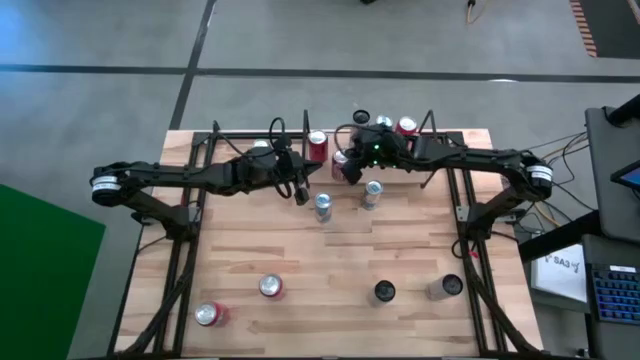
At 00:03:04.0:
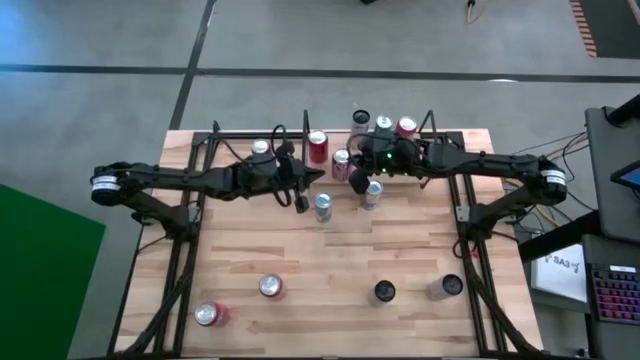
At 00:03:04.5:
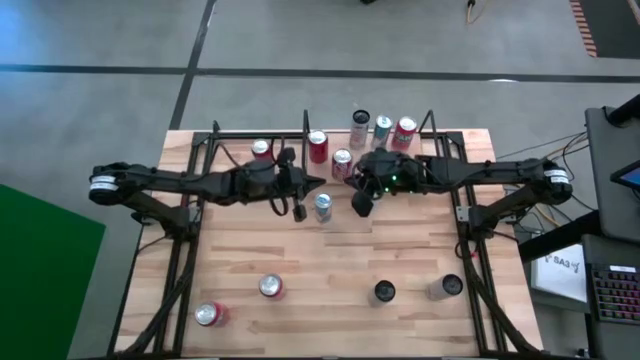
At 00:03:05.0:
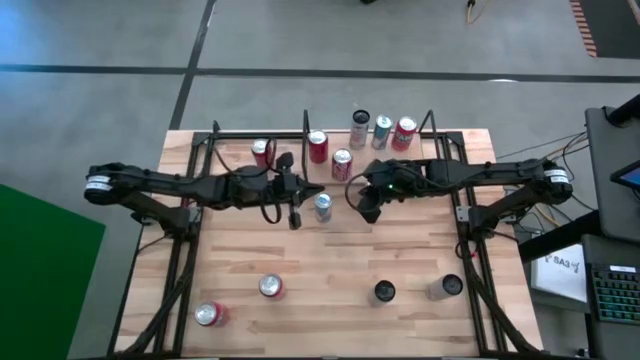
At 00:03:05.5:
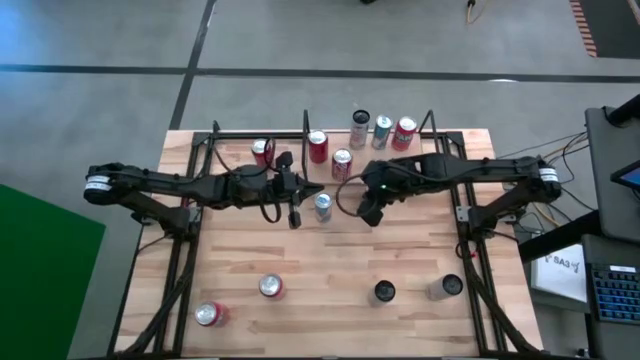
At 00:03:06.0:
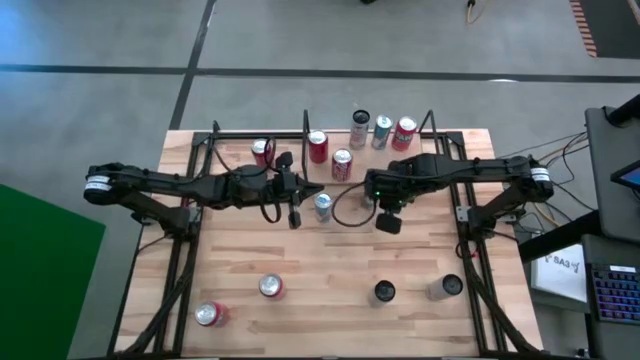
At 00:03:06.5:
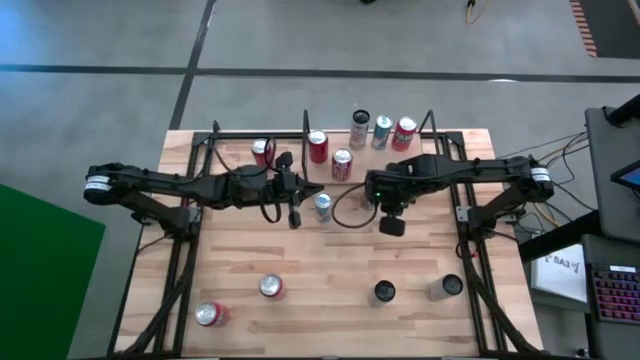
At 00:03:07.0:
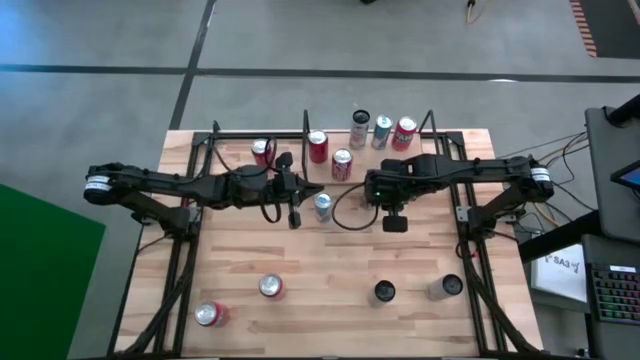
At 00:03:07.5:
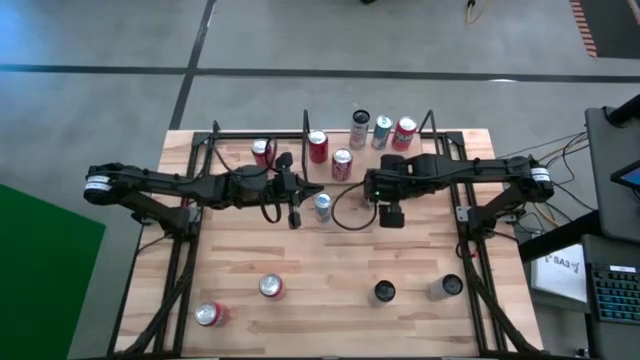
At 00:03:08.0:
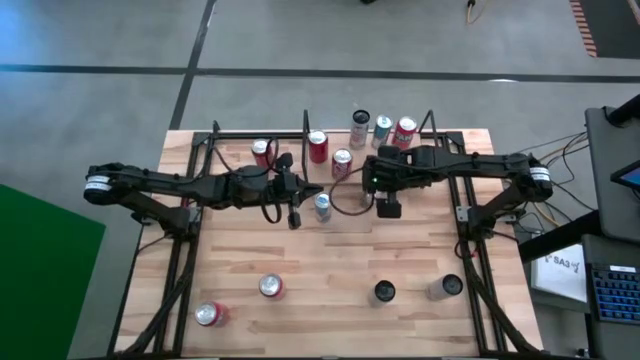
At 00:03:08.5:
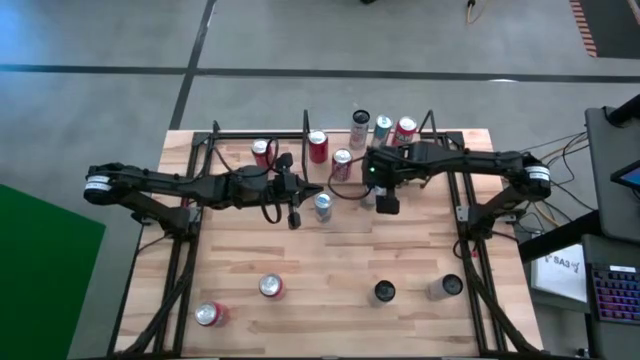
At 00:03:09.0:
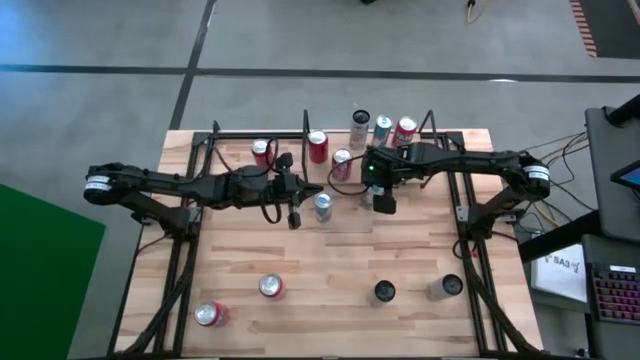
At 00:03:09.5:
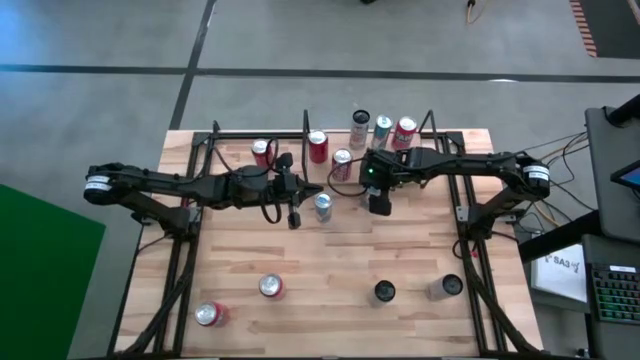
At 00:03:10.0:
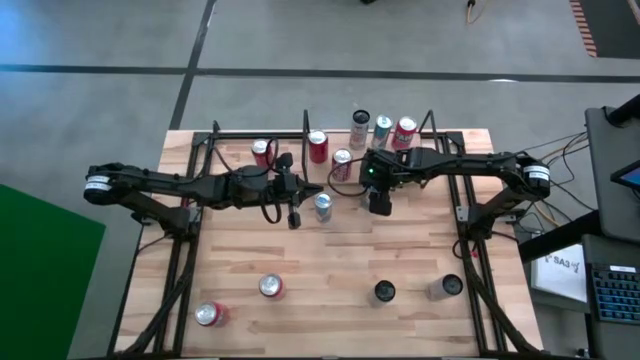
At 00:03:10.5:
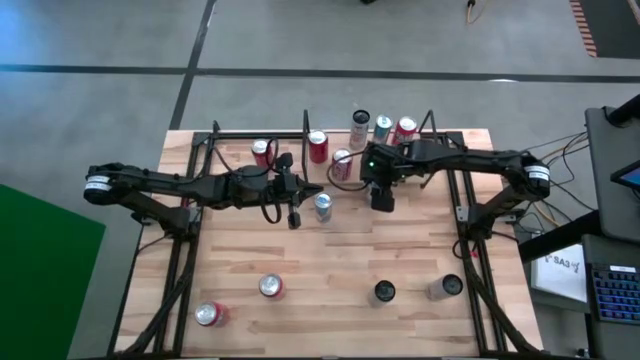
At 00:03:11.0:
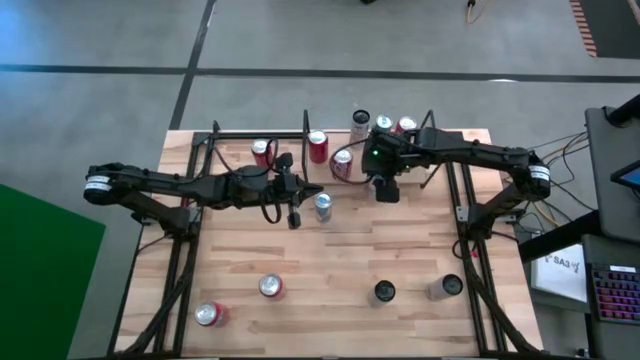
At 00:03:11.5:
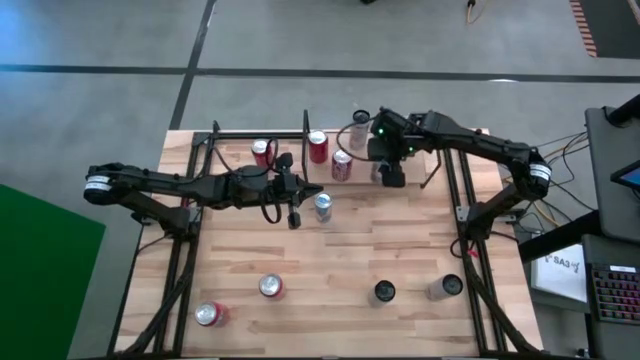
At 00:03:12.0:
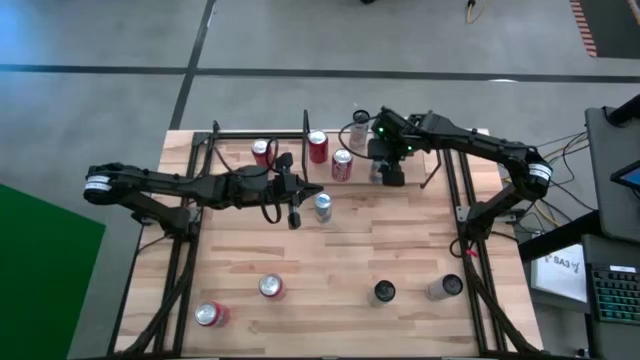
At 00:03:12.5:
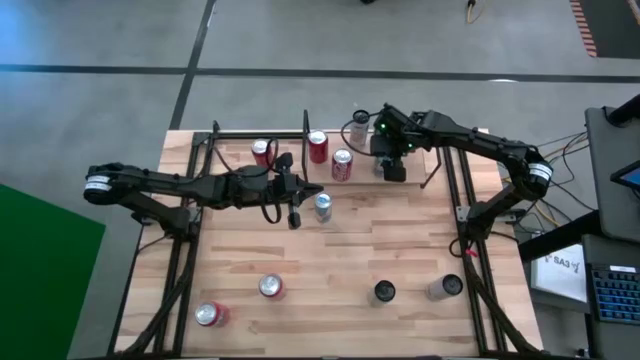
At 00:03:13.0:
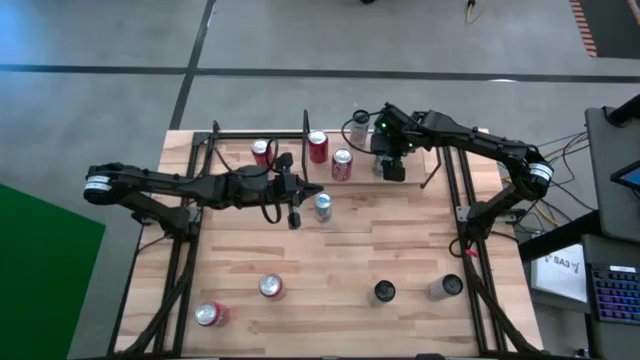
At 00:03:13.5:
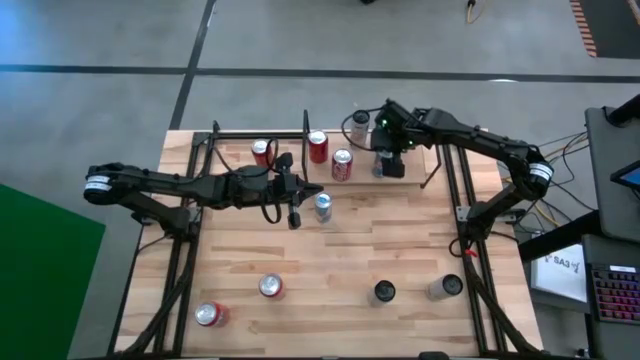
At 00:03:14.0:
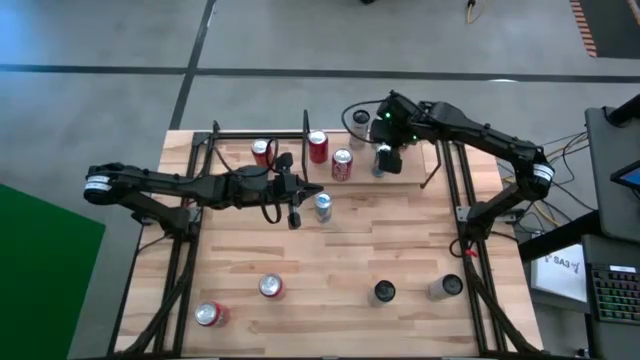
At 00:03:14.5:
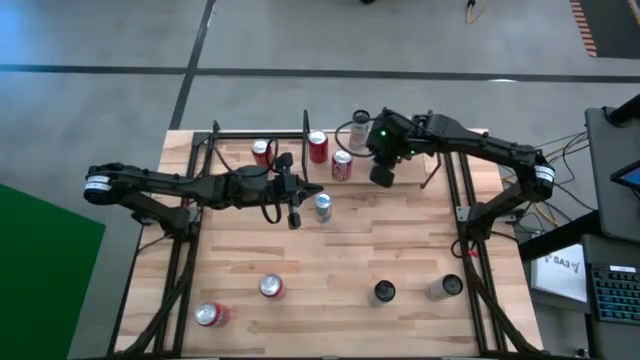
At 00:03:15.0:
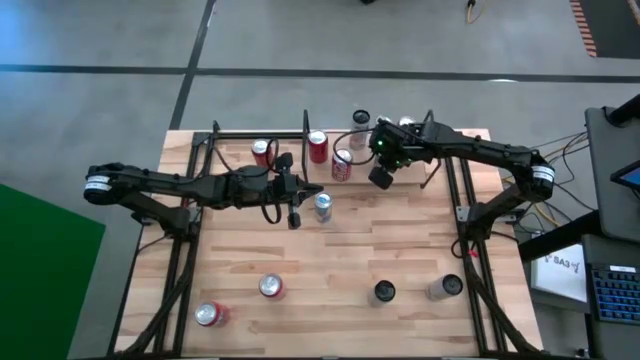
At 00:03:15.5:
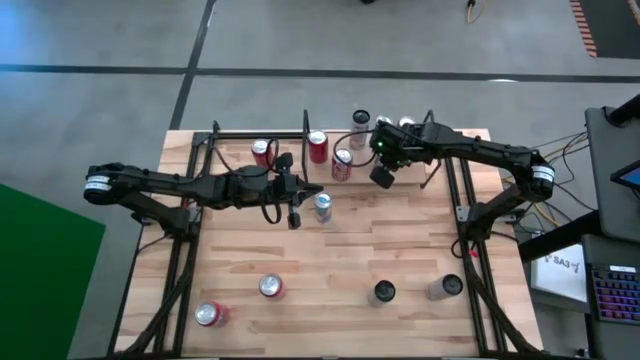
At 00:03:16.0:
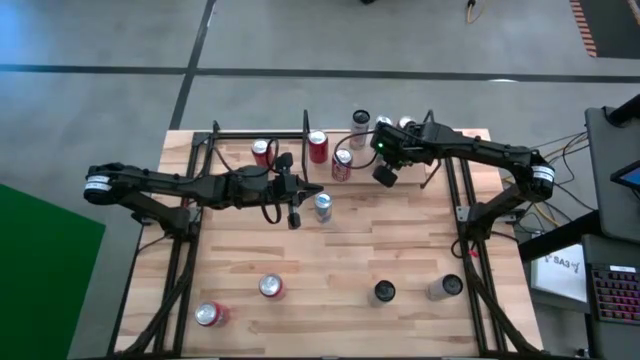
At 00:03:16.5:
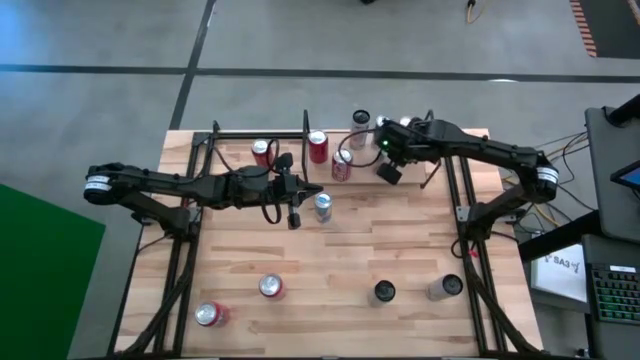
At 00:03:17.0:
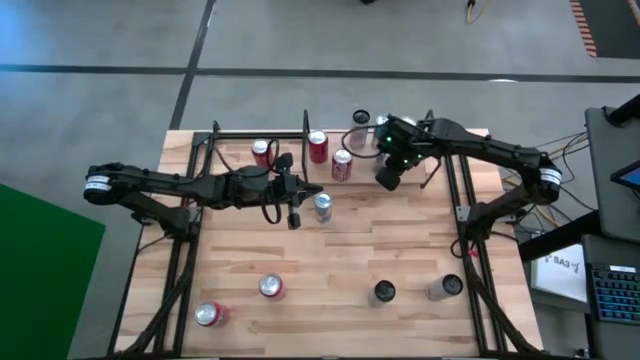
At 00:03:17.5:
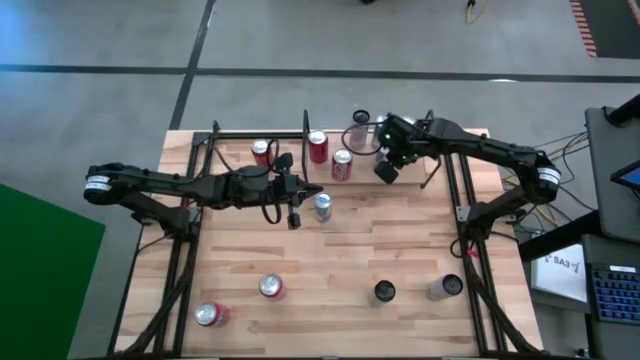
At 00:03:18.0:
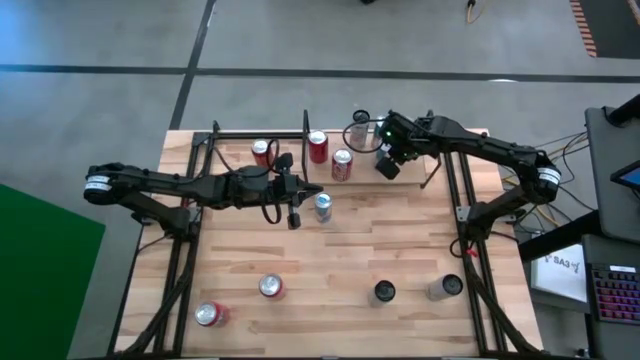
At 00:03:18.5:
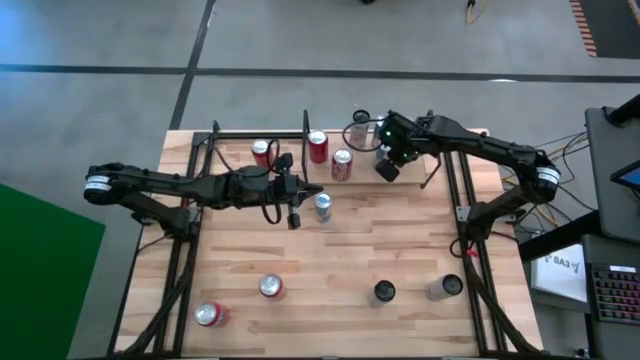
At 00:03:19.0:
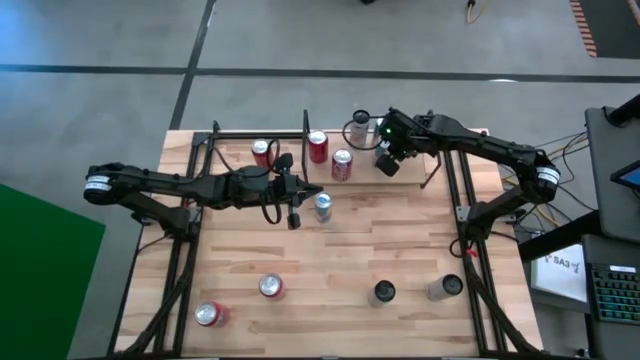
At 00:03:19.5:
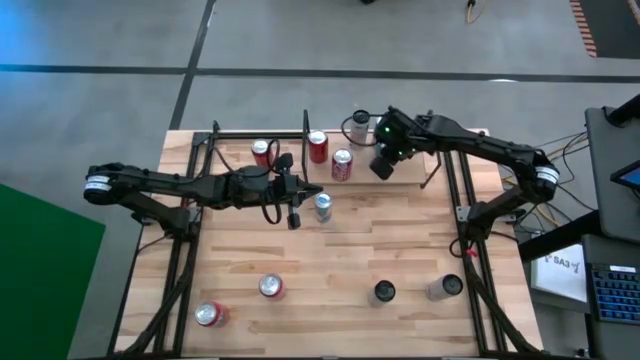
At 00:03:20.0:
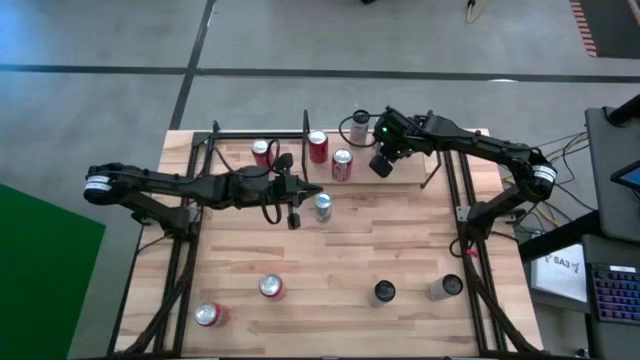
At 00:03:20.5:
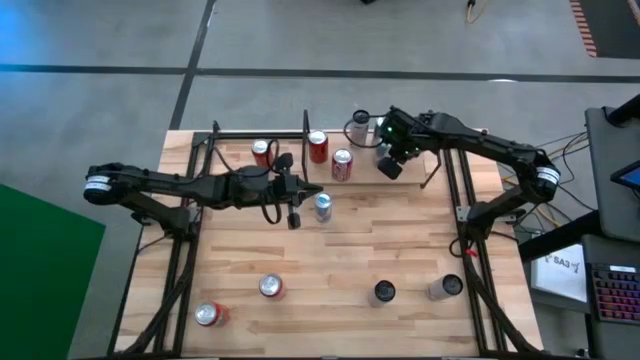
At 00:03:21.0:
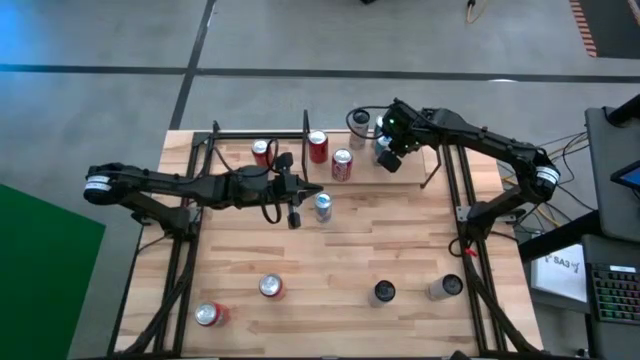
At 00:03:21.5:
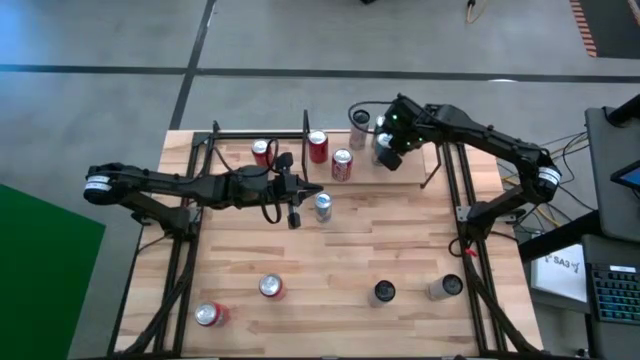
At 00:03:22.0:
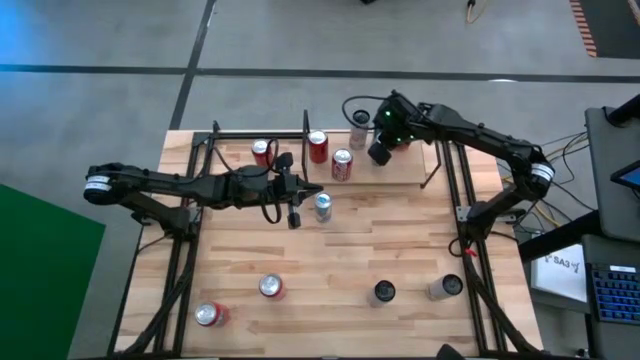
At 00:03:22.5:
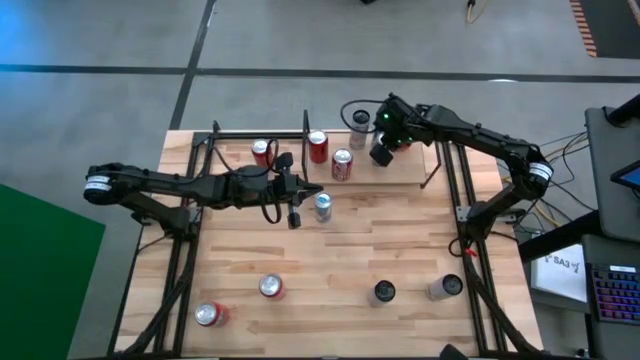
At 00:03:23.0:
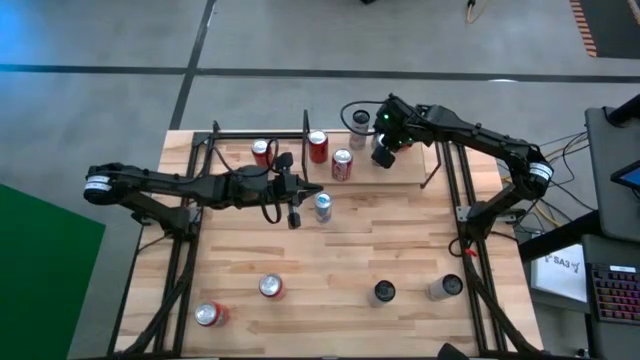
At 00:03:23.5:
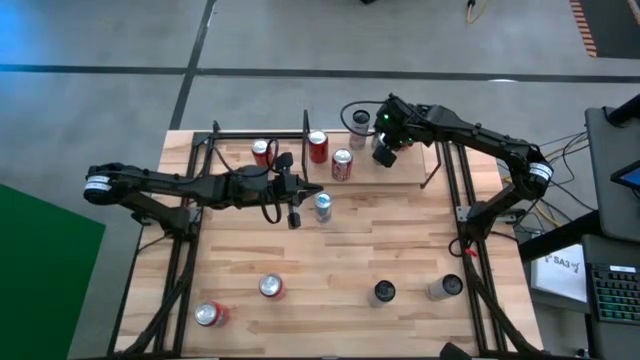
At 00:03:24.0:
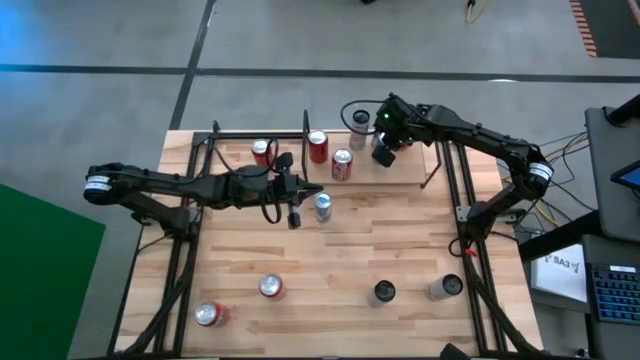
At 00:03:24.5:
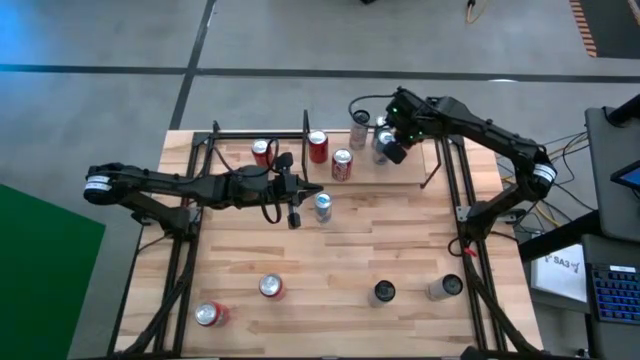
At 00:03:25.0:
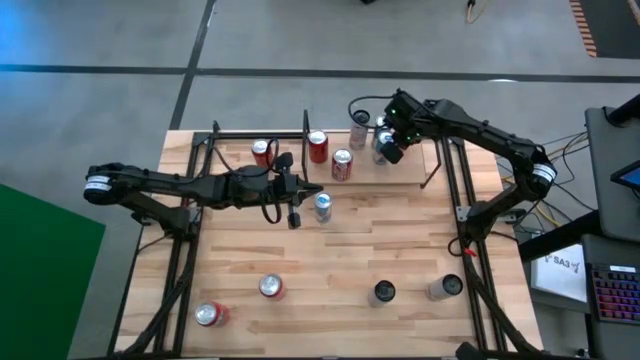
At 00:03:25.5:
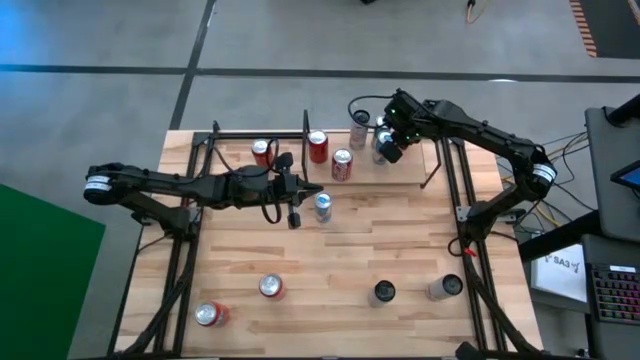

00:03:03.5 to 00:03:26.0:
Task: Place canned beverage on shelf
Put the white and blue soda can on the shelf
